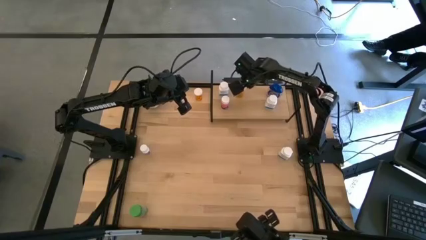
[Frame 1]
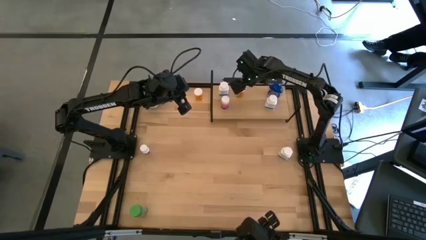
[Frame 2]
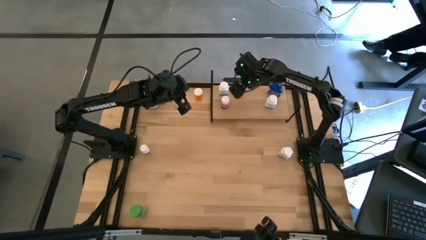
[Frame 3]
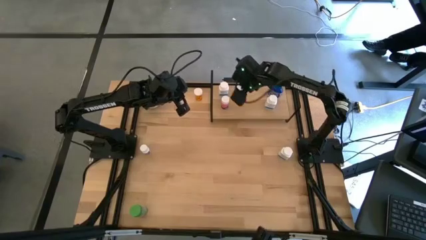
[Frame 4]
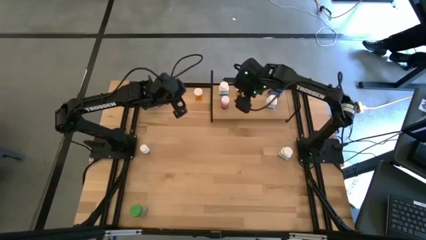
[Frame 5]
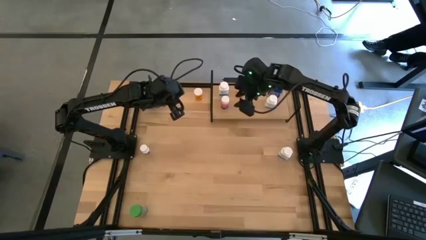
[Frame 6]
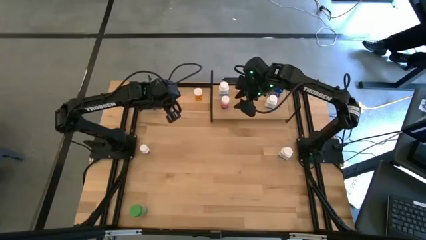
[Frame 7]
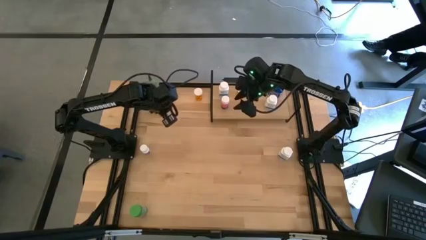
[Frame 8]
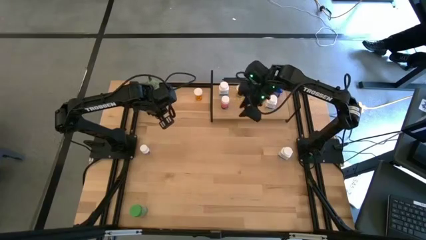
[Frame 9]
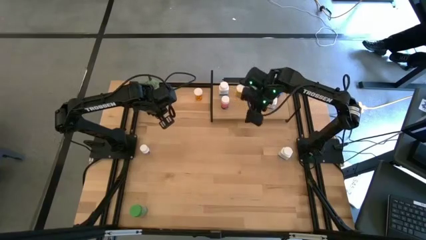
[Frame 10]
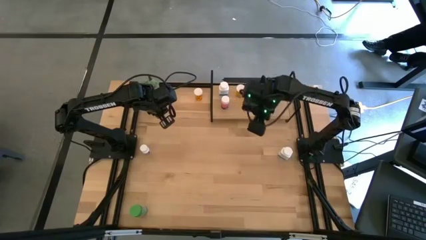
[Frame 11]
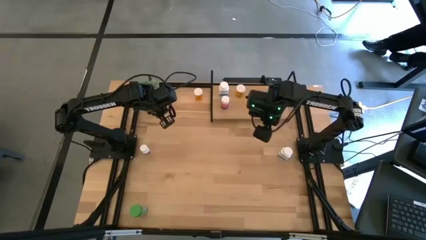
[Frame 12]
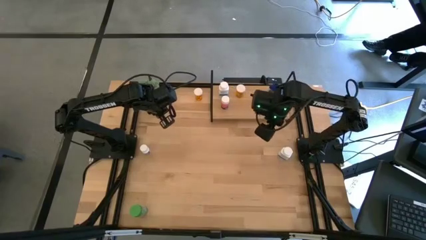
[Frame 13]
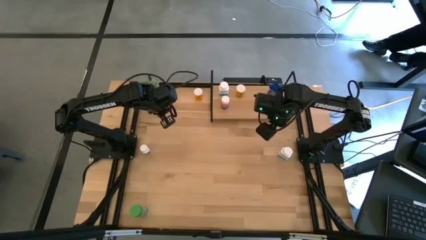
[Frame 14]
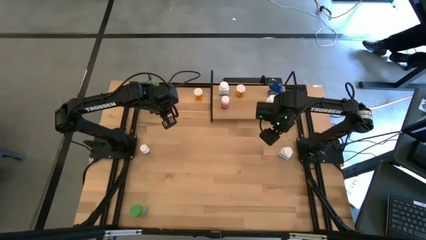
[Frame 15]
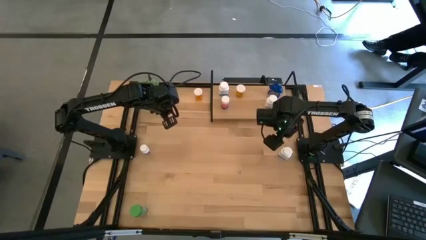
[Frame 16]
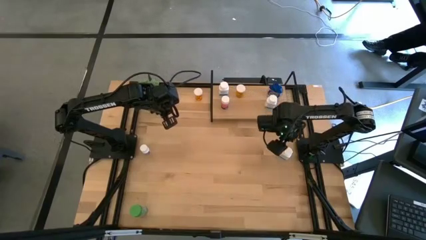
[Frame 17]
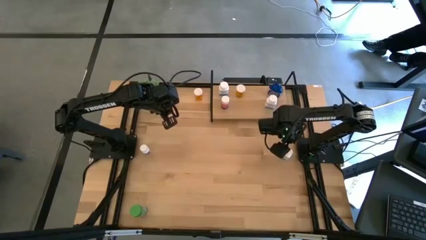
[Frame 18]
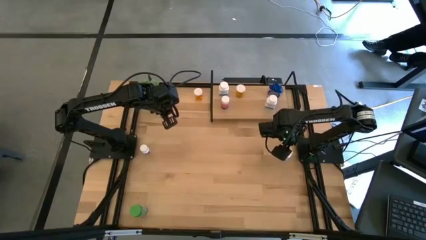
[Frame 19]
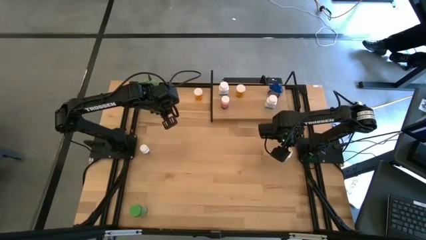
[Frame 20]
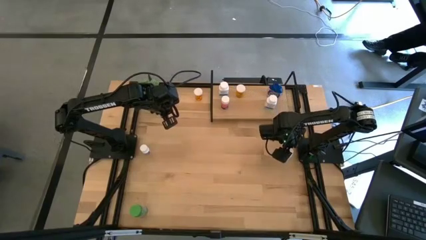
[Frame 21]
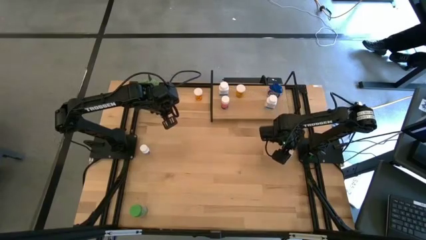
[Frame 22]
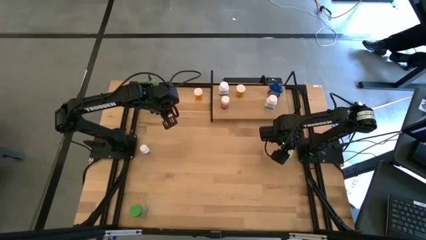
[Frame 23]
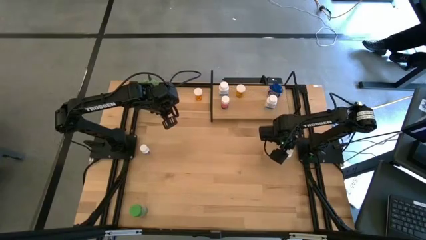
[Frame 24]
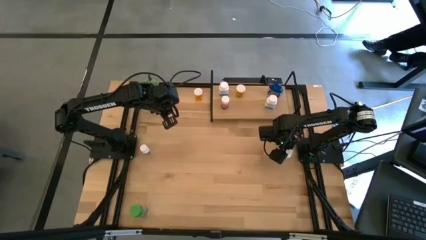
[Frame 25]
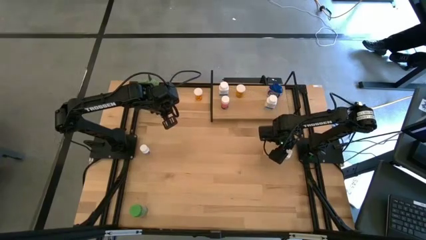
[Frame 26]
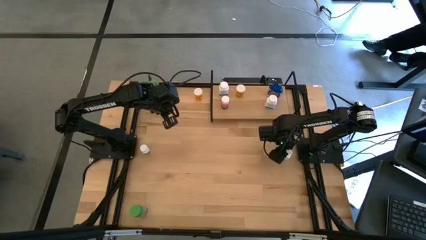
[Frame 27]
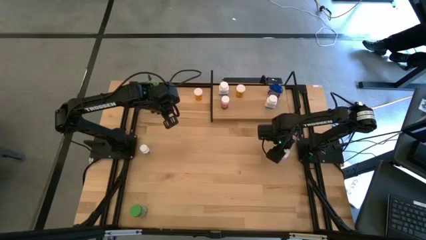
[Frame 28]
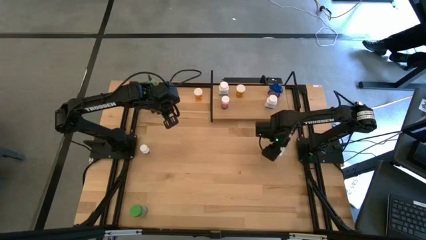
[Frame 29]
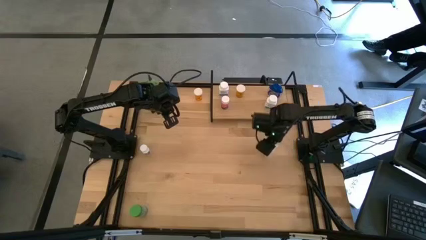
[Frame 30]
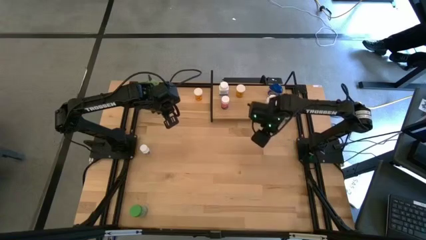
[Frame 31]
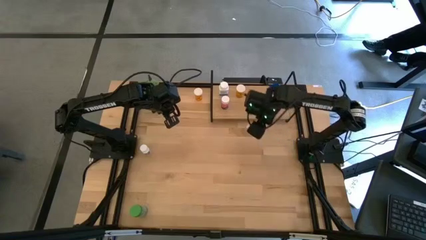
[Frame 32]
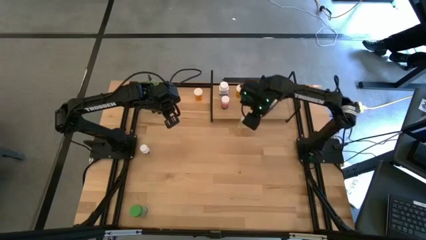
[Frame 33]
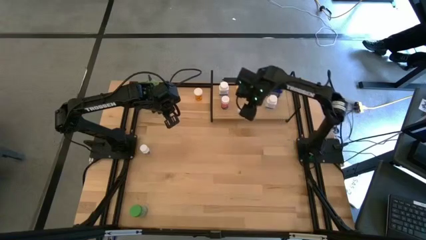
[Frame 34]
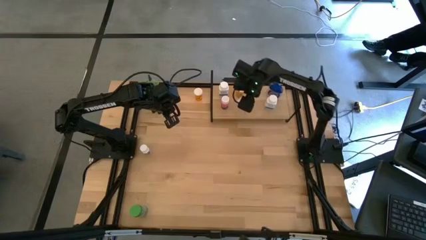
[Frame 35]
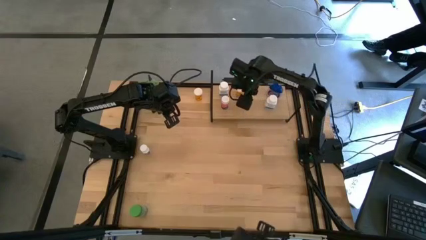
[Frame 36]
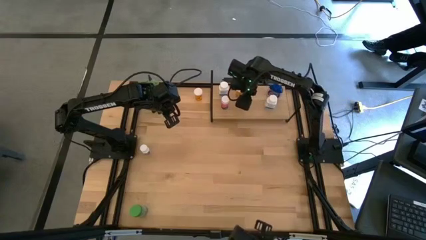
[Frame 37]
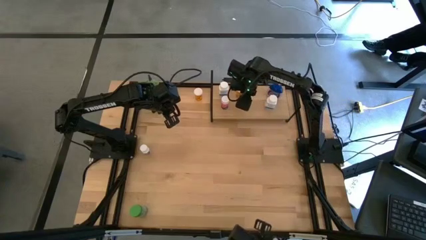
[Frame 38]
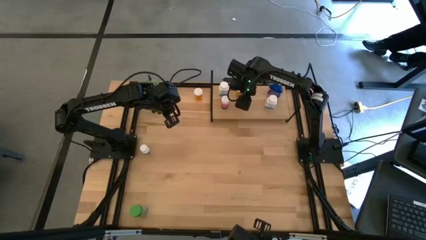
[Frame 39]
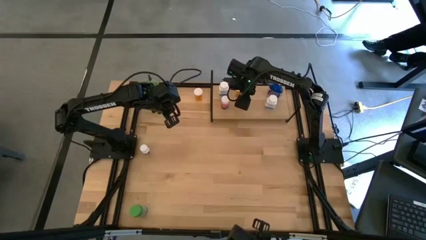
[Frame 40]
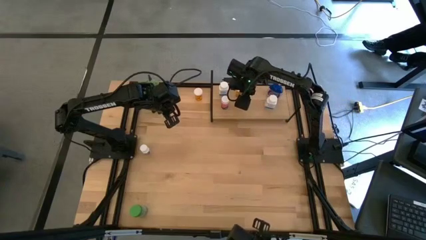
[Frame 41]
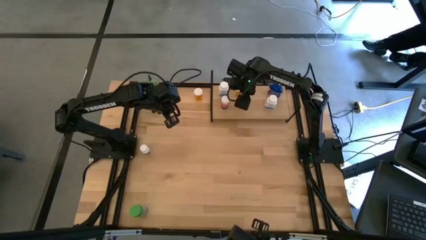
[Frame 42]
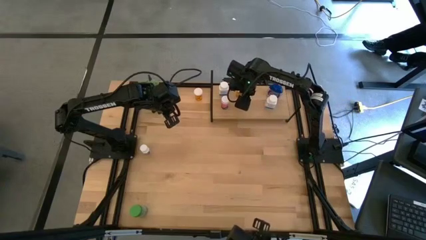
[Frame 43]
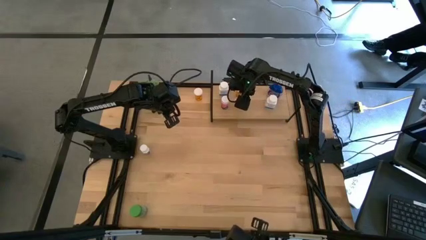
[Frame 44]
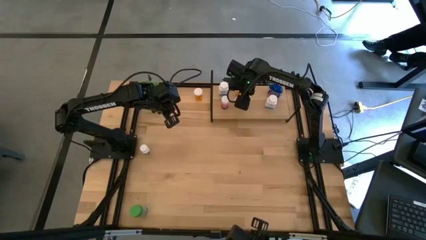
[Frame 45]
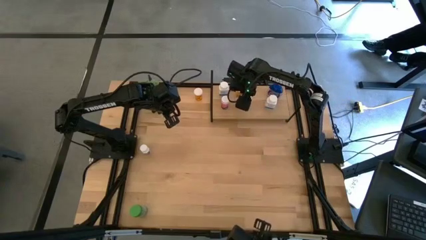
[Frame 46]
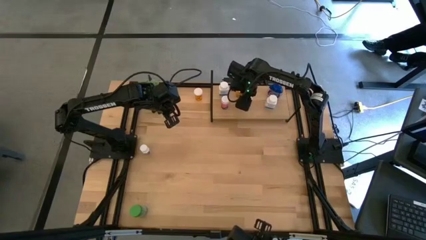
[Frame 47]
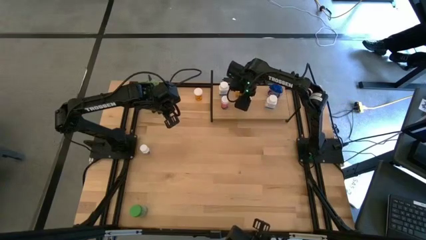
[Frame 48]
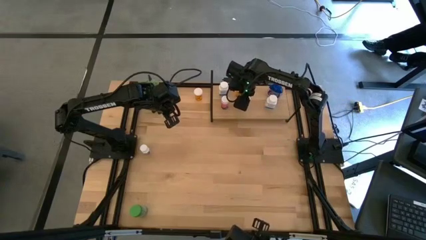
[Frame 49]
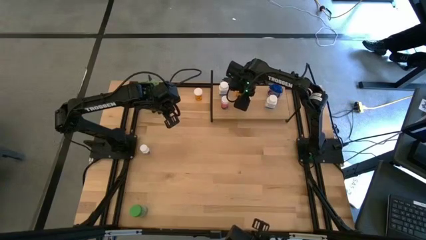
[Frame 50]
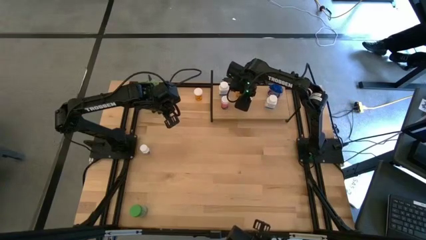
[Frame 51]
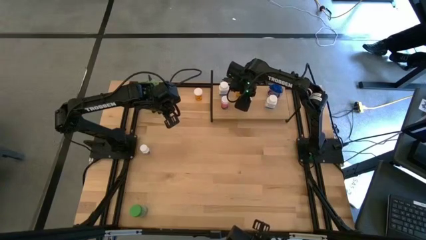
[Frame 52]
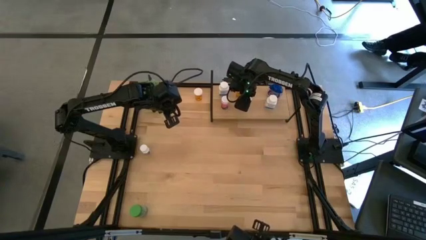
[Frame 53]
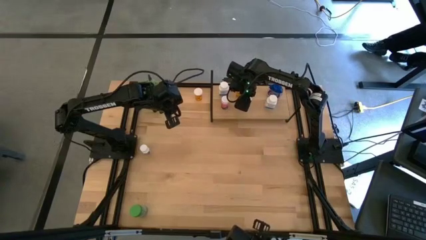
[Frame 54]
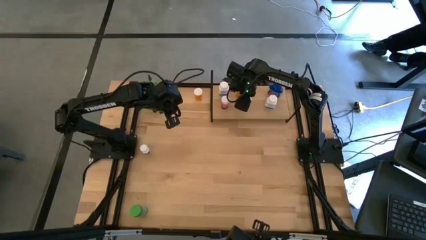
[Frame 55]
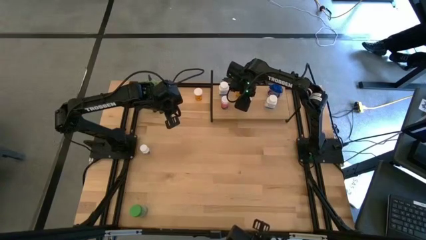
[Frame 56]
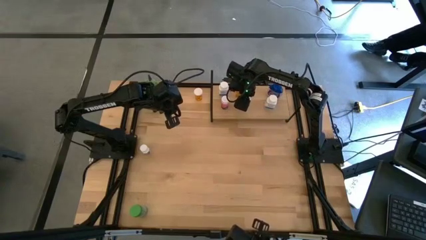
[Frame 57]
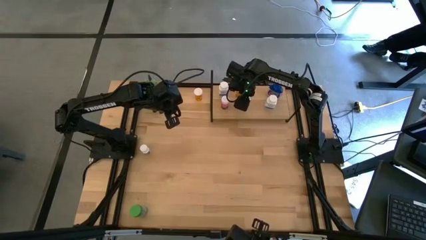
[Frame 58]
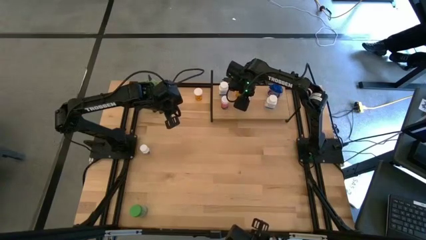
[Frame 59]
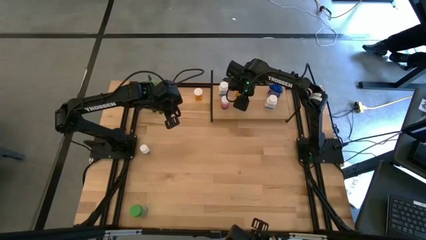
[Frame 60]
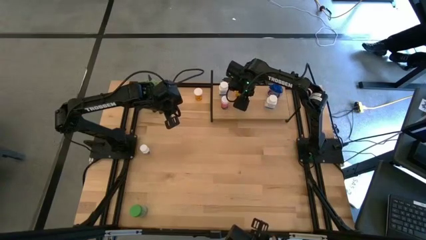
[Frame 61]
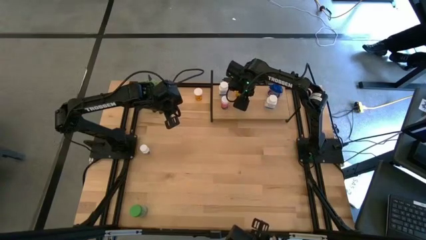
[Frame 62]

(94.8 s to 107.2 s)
Task: Pick and place medicine bottles onto shelf by color
Put the white medicine bottle on the shelf
